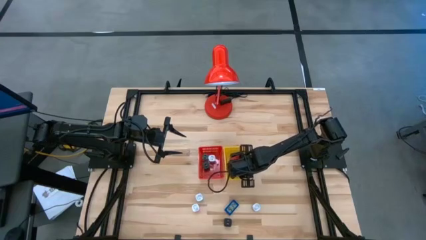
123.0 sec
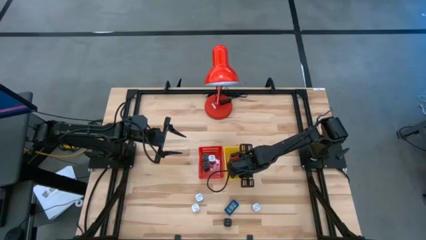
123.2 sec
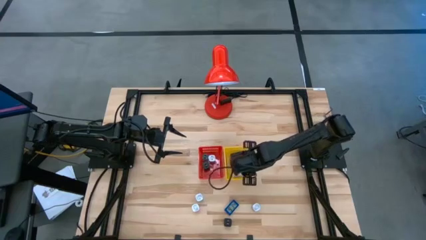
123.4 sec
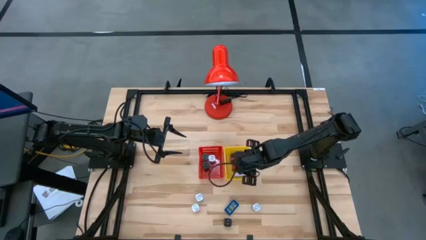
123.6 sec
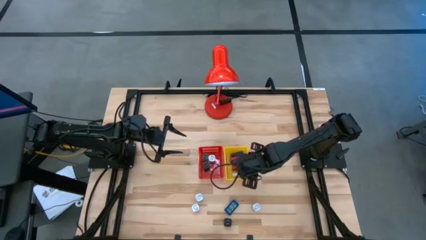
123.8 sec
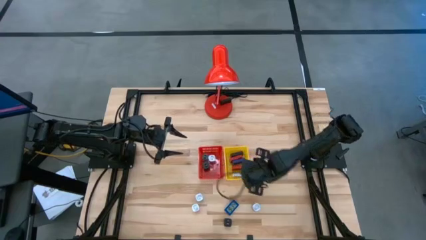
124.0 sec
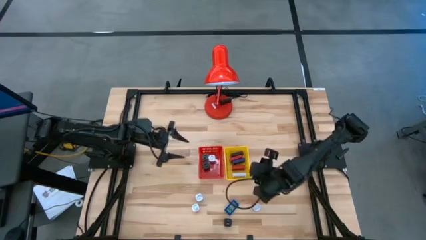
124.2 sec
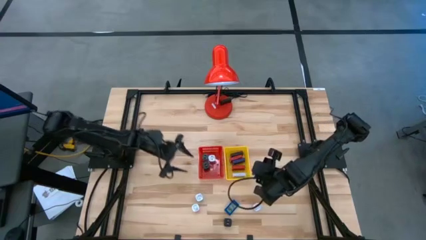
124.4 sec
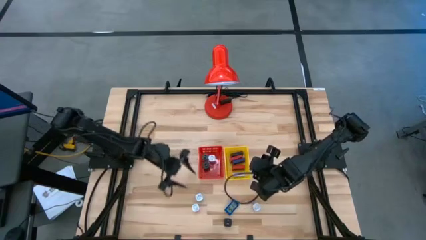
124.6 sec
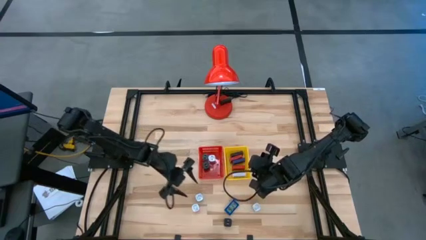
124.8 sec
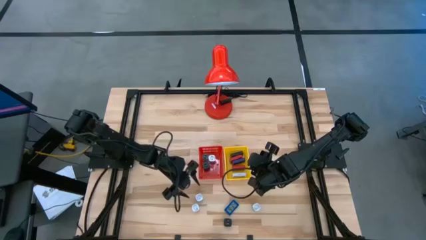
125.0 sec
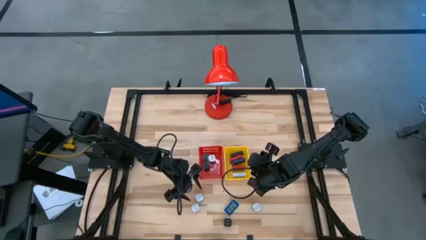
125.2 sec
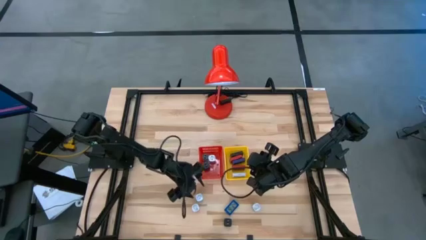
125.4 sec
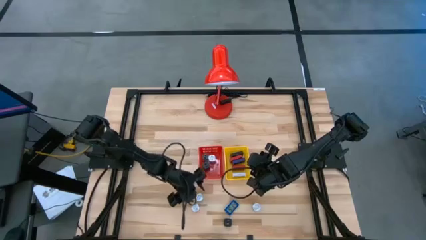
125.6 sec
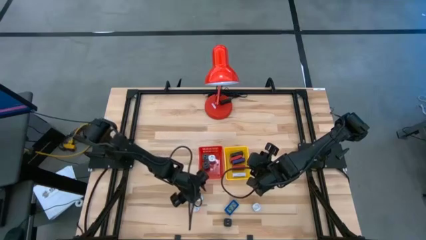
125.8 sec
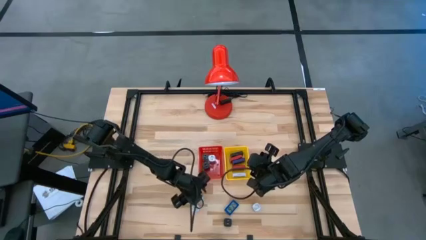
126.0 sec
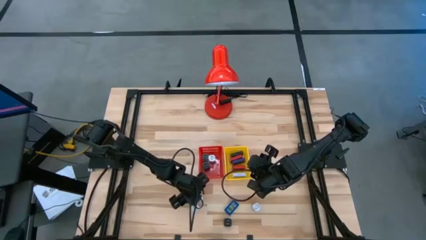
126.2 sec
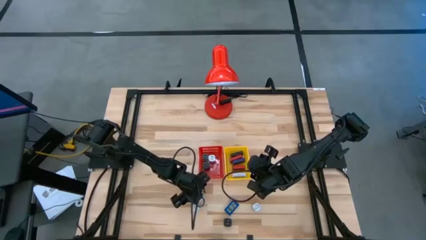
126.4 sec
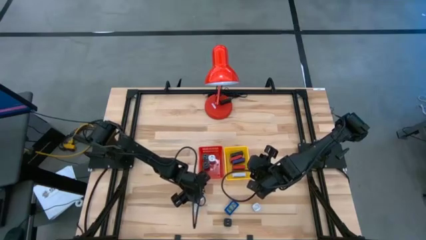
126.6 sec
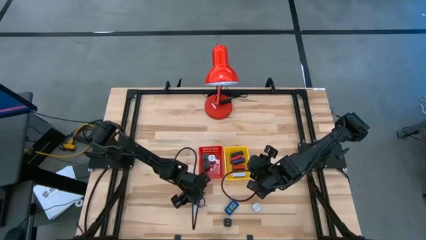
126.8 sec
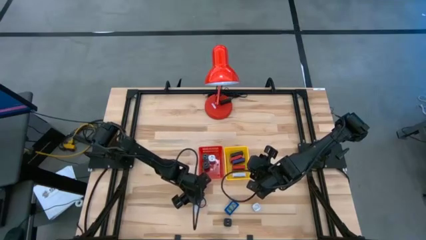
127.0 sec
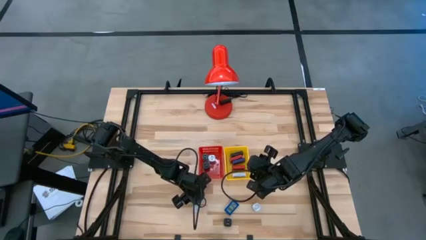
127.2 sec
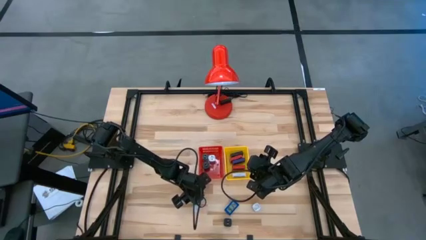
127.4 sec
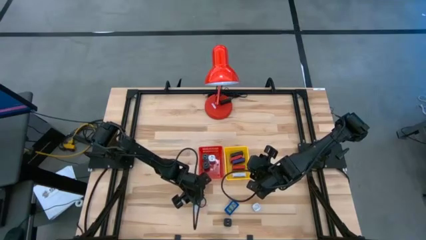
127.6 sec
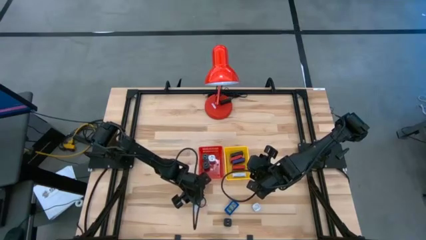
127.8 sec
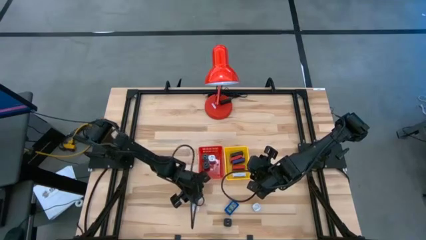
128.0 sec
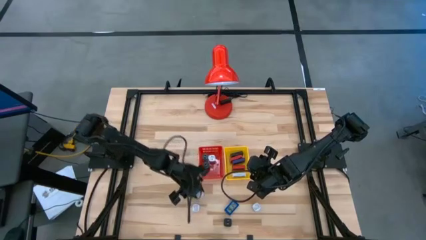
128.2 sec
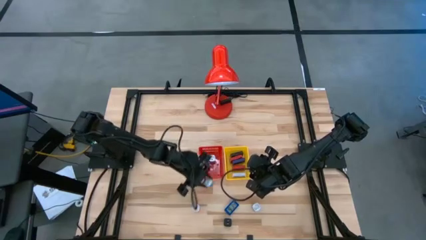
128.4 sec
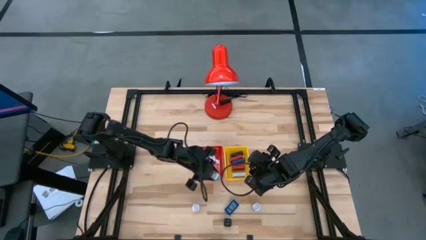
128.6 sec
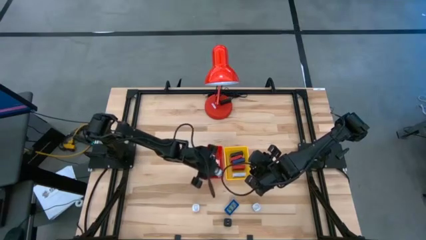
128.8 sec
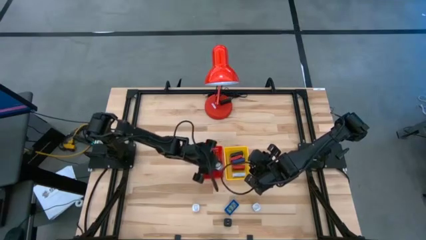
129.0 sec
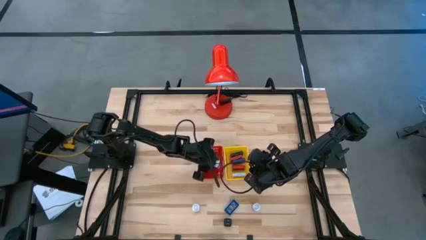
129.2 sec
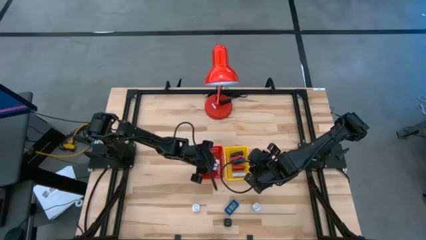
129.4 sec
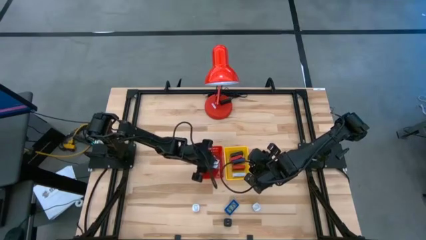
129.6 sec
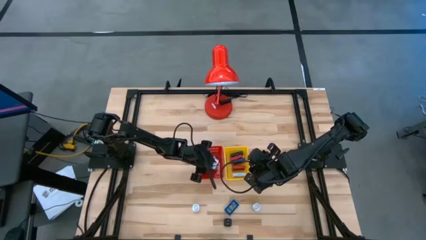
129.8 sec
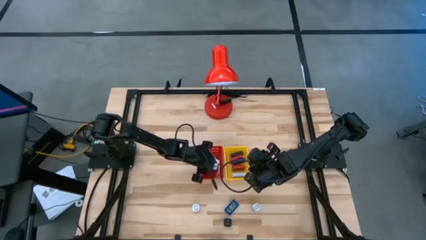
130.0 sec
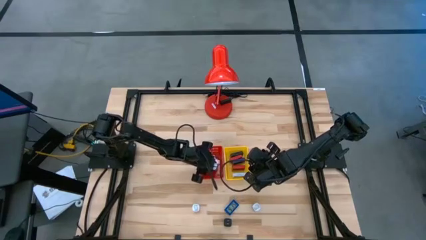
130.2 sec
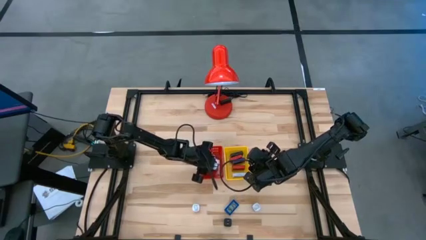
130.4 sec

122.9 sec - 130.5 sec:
Task: Pick & Place Office items
Put the blue charger adapter into the red bin

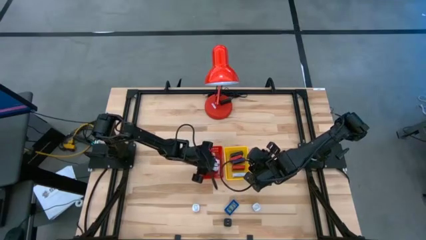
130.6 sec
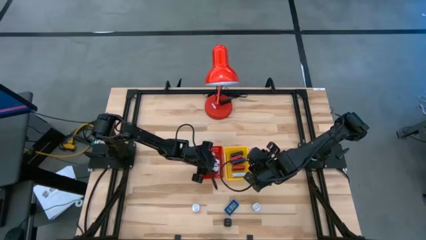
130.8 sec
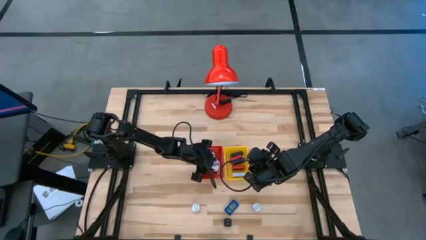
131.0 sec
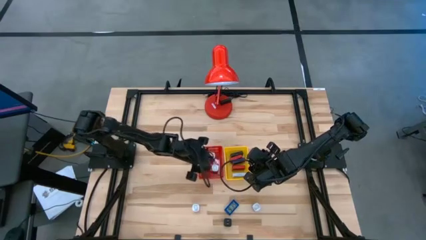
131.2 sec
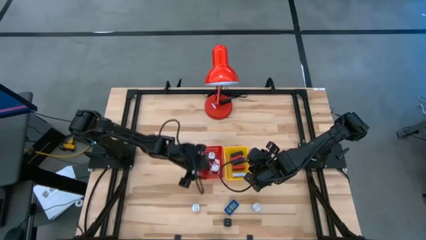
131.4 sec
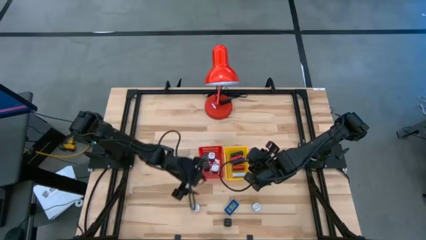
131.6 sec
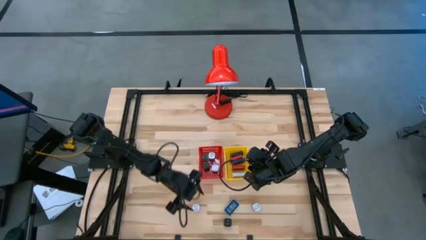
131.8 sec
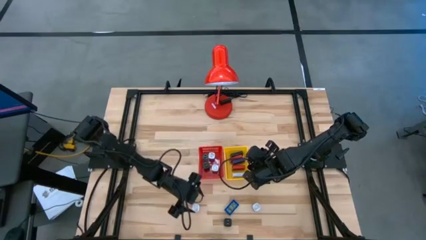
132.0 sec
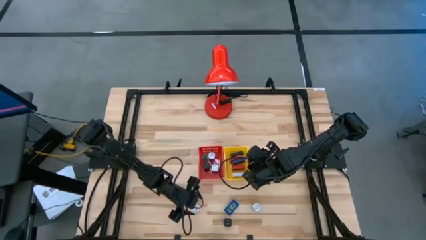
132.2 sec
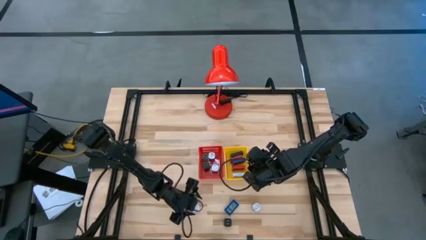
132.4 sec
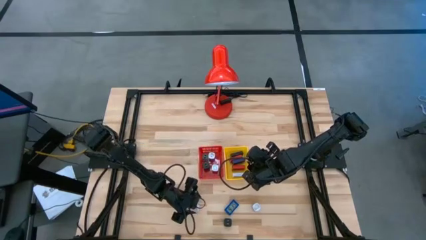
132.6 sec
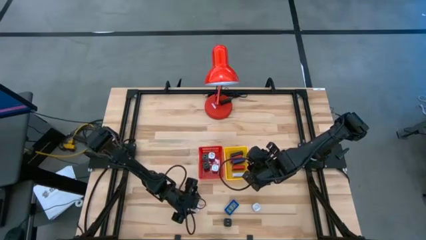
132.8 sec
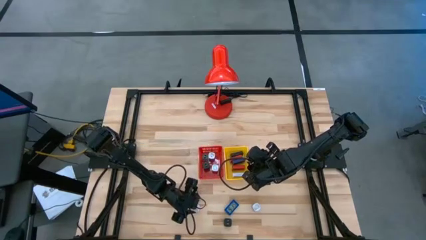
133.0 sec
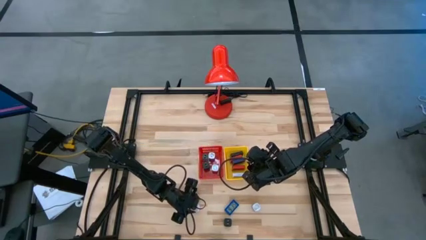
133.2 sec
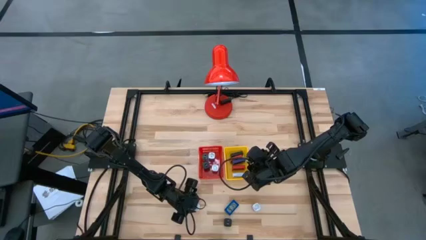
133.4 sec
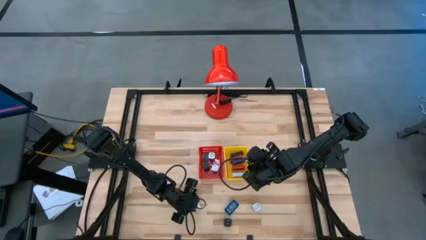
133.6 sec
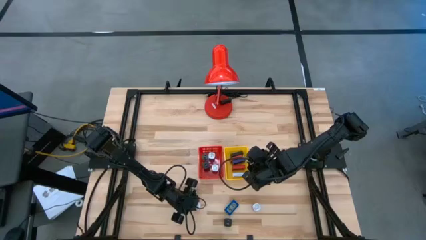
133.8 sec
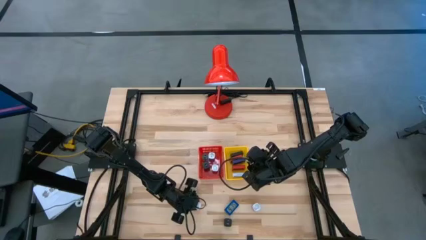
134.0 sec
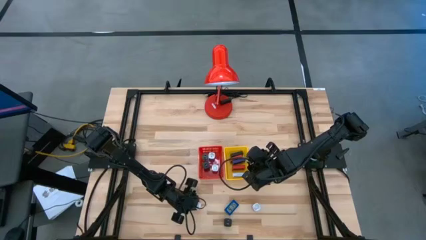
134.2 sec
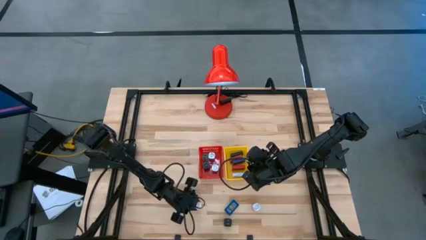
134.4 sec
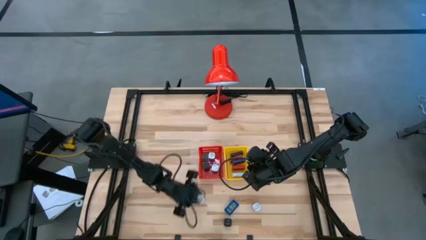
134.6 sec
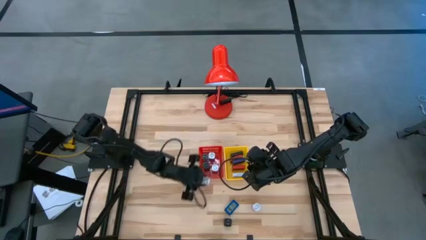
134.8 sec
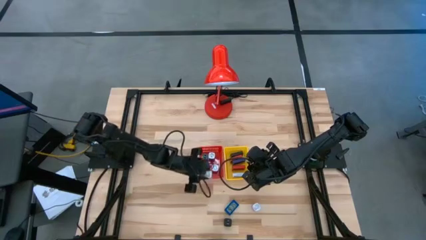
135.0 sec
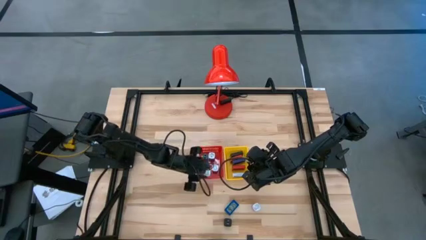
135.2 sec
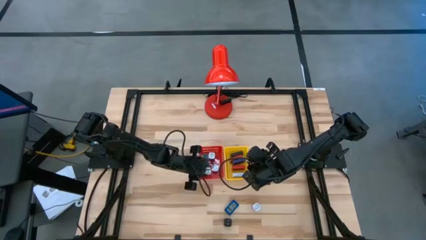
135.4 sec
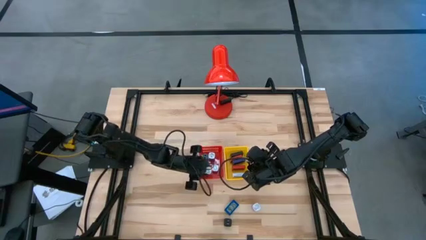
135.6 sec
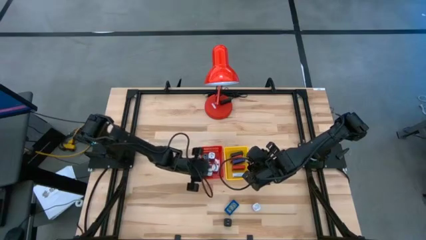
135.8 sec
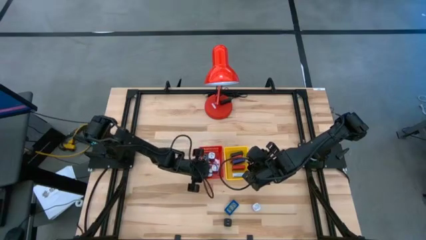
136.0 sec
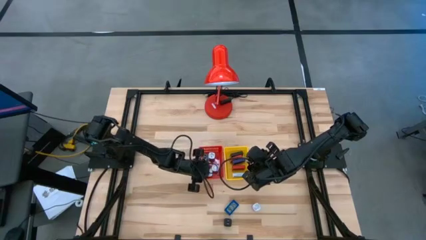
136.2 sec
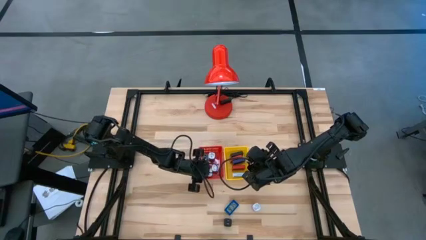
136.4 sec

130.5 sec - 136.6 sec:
Put the pink charger adapter into the red bin
